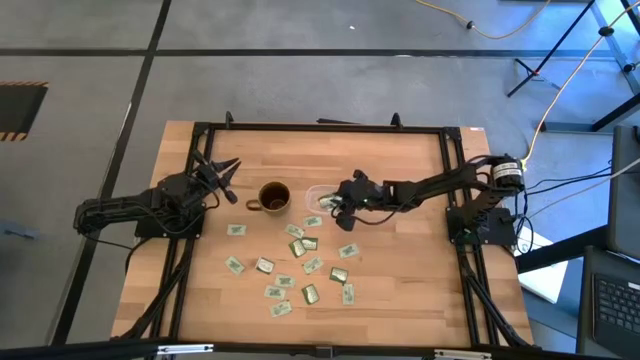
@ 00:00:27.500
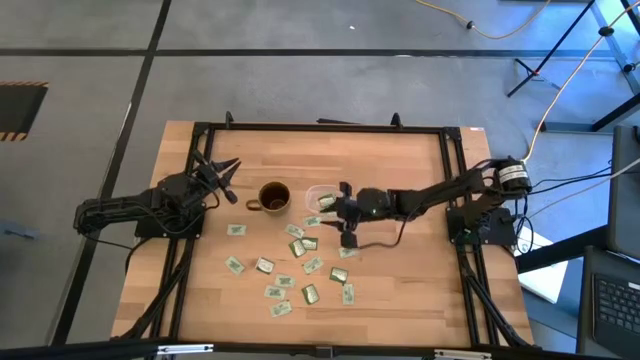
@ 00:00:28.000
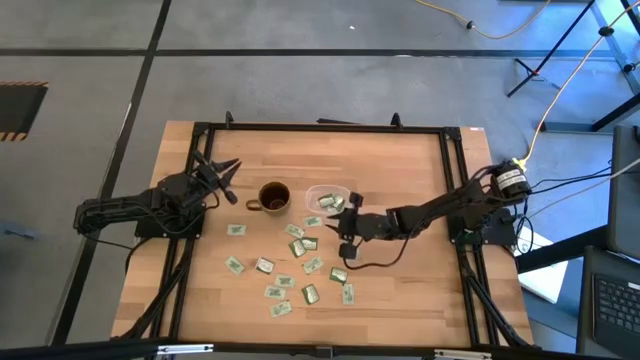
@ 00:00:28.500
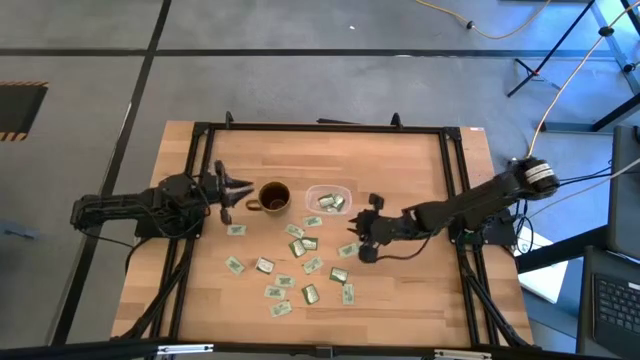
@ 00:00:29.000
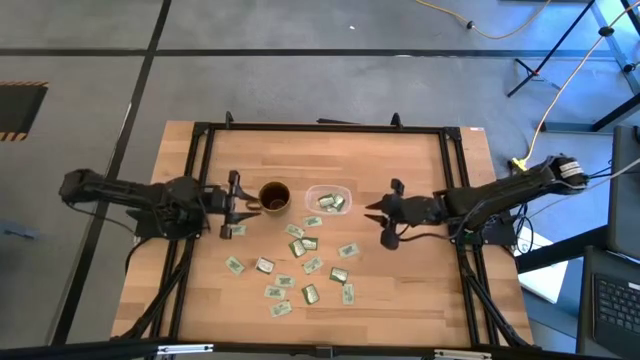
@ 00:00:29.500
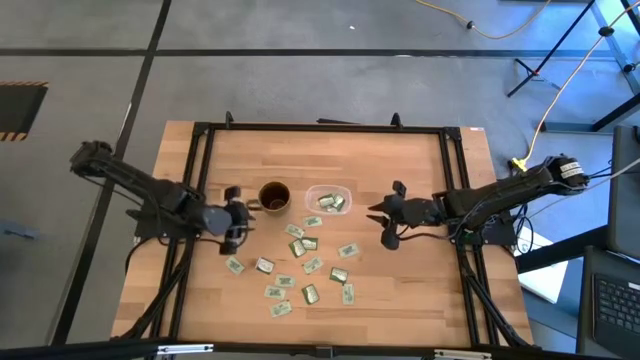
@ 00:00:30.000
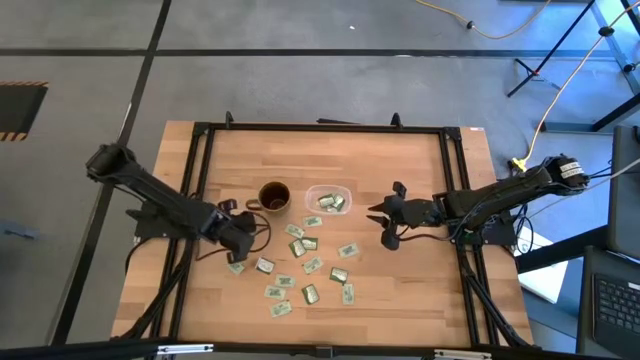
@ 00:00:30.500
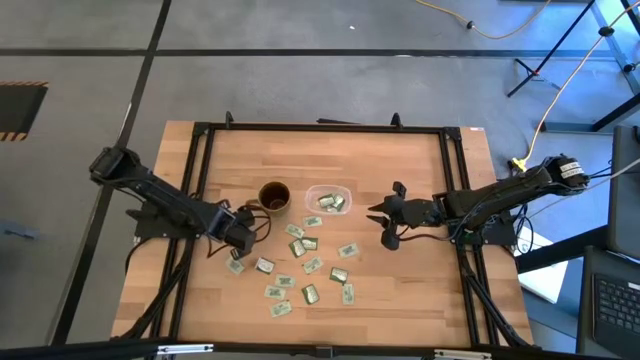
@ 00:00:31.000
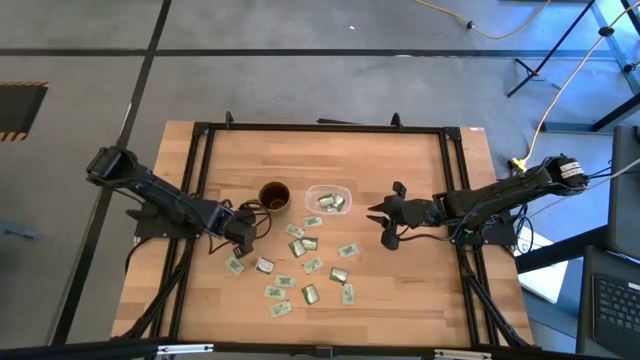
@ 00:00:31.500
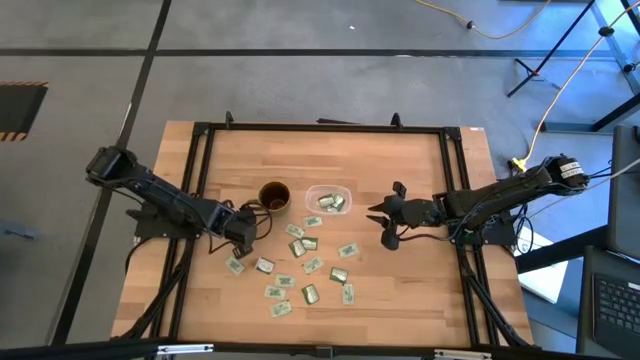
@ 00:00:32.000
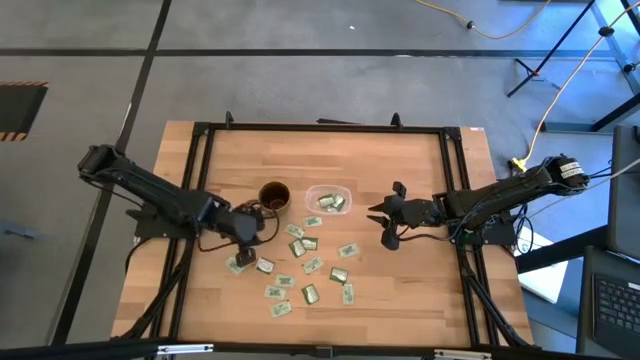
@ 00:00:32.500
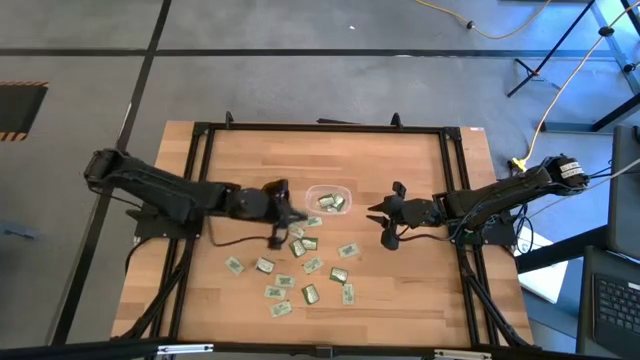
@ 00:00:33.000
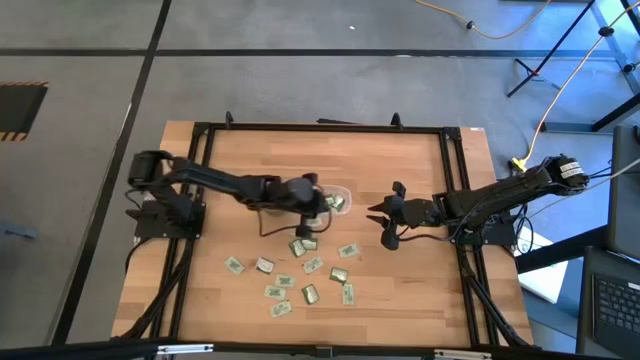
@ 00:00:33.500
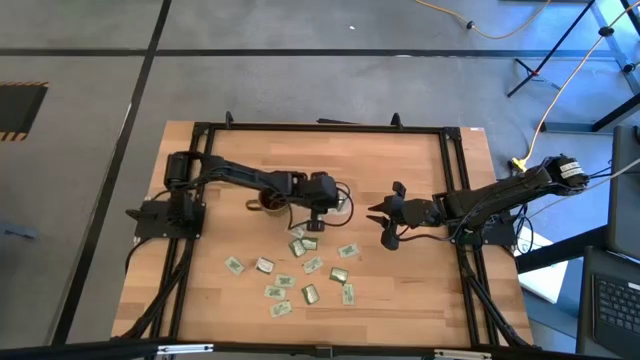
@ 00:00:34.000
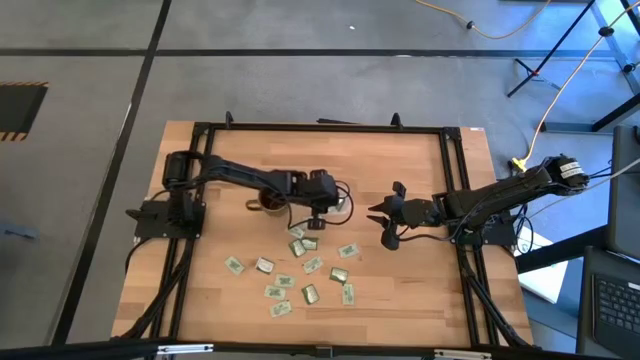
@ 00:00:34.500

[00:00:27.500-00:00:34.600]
Task: Pick and place items into bin
Put the light green stevia pack into the transparent bin

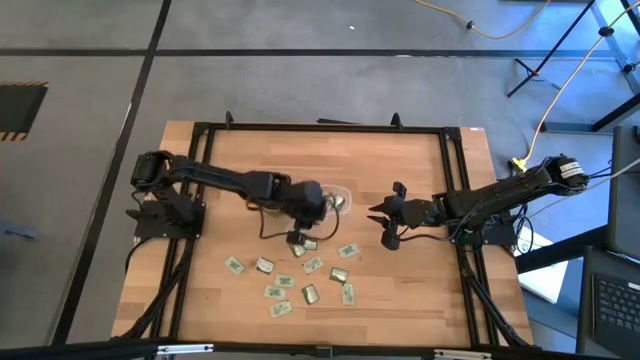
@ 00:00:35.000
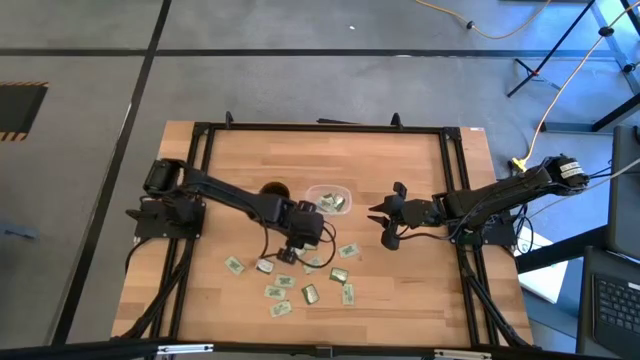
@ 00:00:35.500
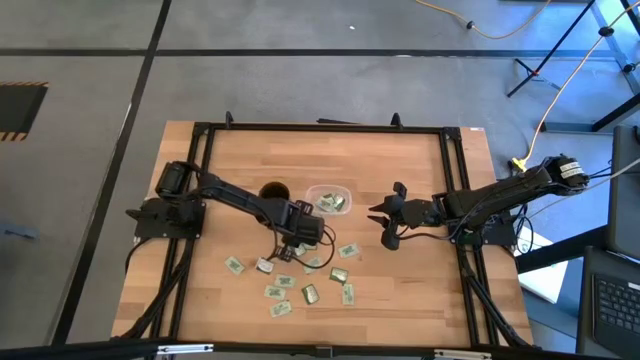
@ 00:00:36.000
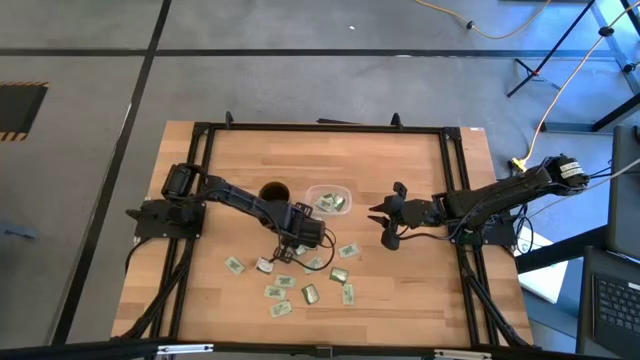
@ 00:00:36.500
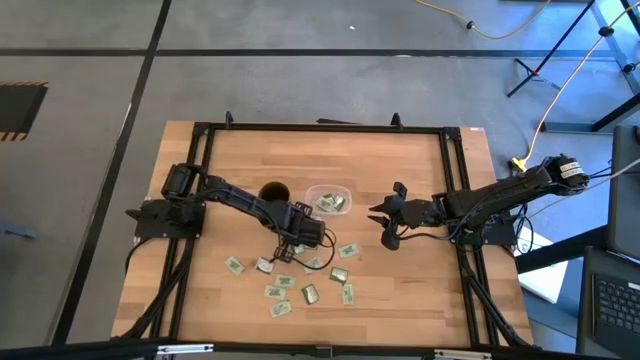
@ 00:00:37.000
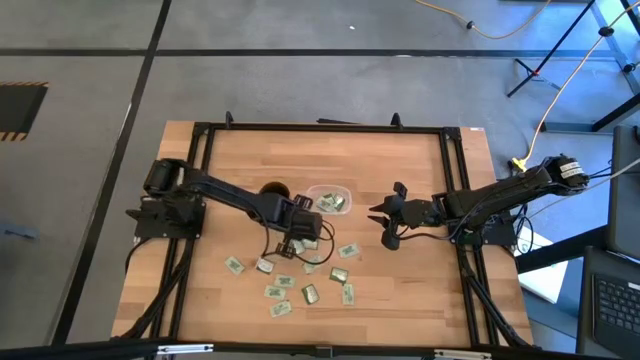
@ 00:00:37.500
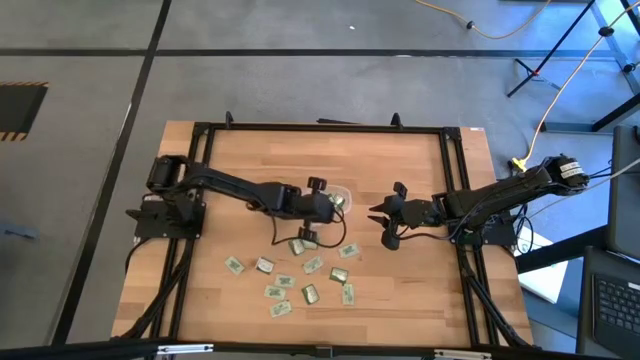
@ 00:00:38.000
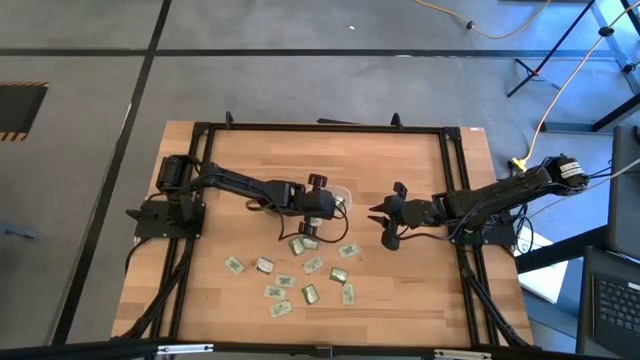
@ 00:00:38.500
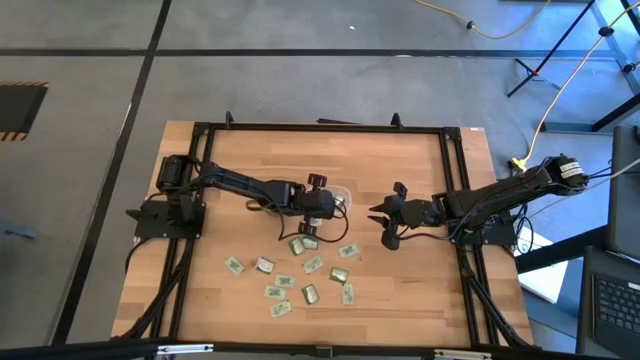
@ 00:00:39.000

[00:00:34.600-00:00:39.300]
Put the light green stevia pack into the transparent bin

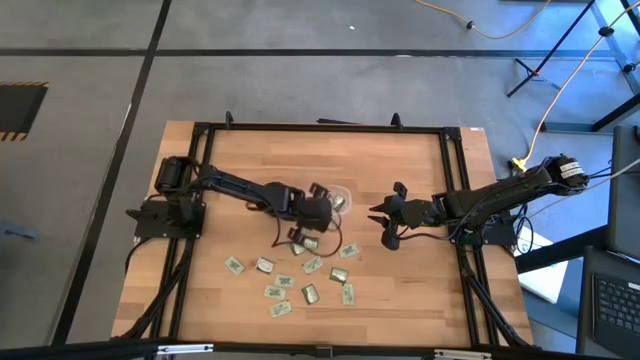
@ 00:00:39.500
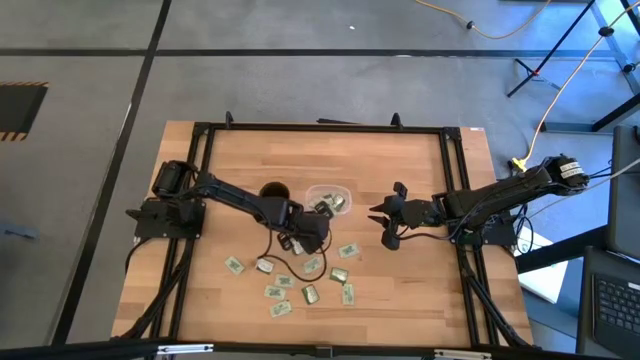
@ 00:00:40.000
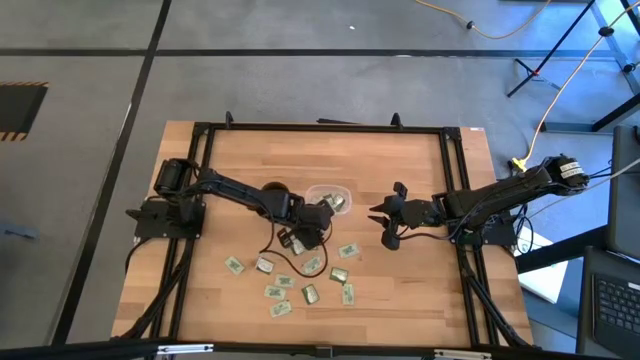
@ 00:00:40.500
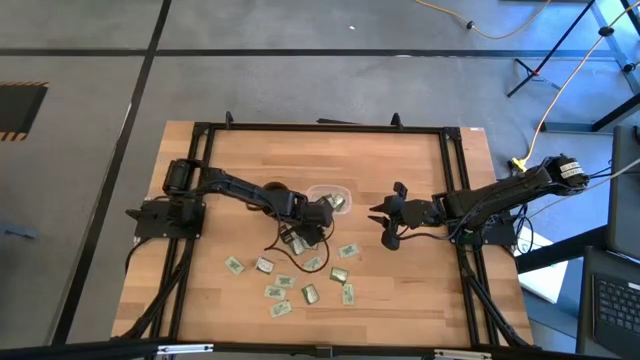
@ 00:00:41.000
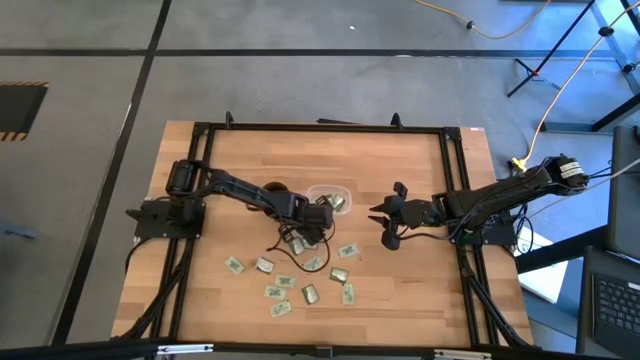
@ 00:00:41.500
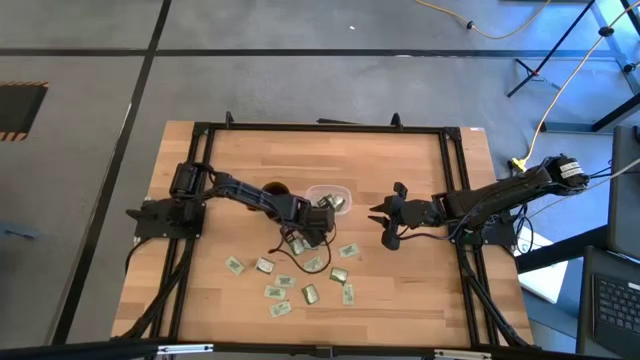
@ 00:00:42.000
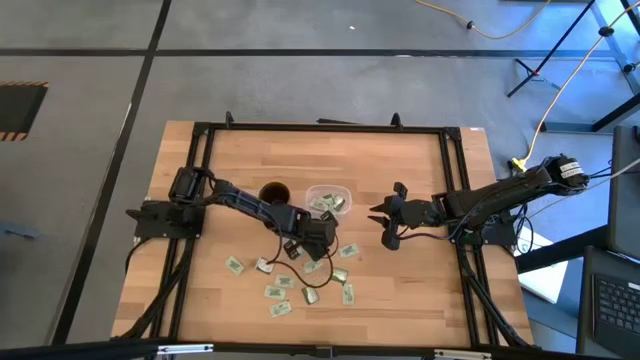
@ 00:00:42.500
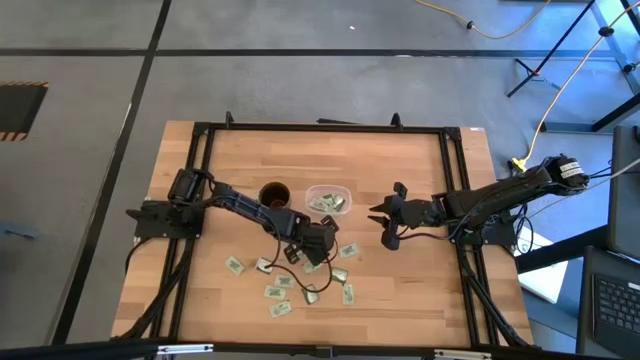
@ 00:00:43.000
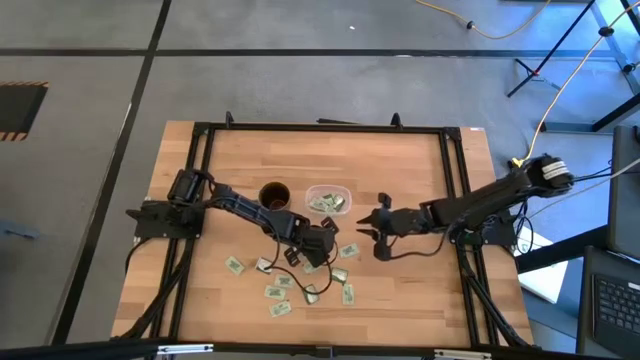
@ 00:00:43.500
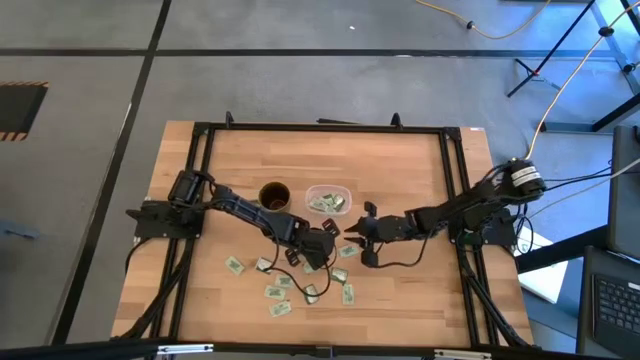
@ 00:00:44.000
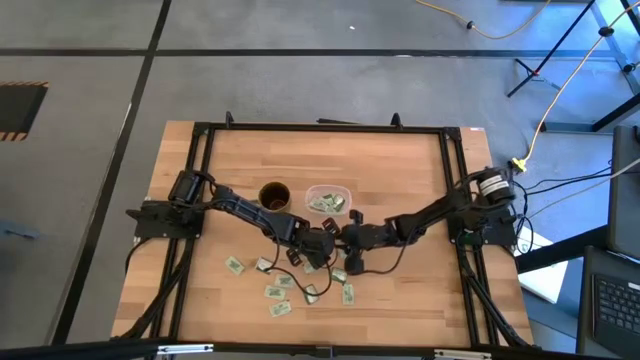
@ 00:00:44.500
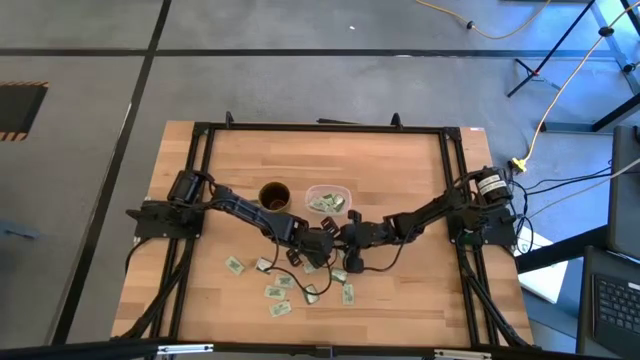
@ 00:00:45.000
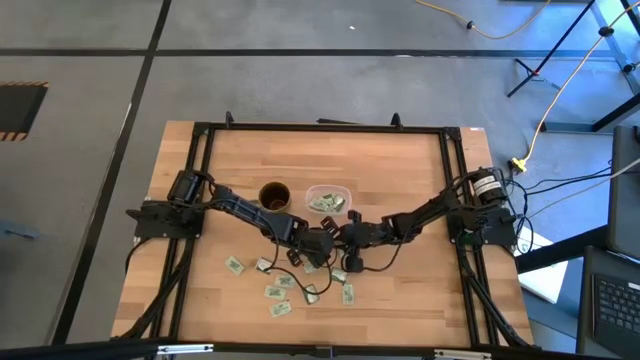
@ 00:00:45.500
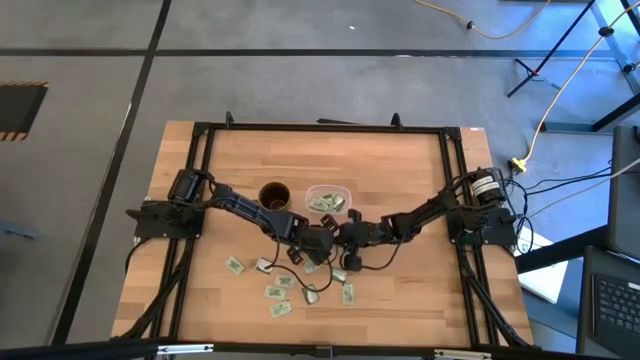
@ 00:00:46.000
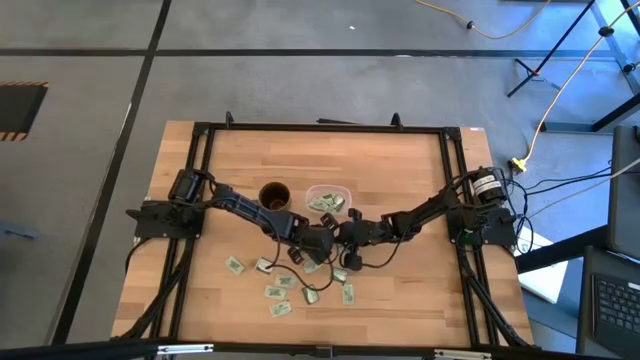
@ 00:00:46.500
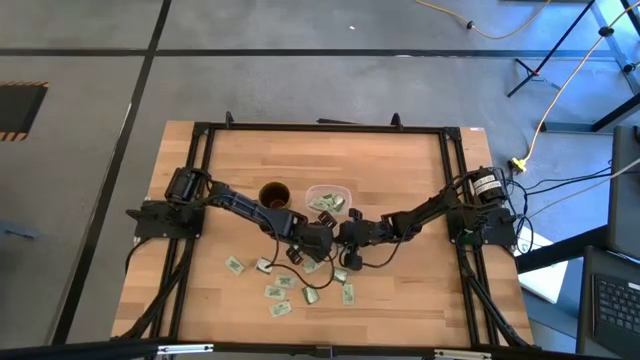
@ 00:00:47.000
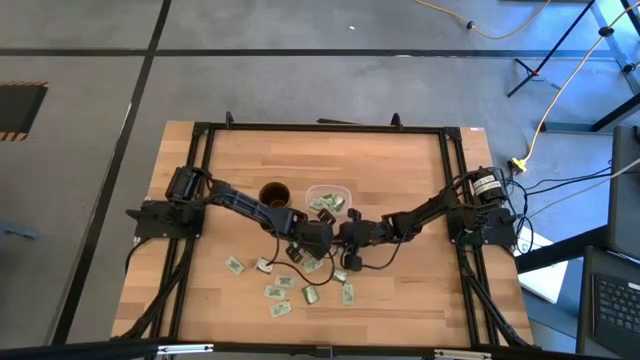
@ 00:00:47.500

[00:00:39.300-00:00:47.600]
Put the light green stevia pack into the transparent bin

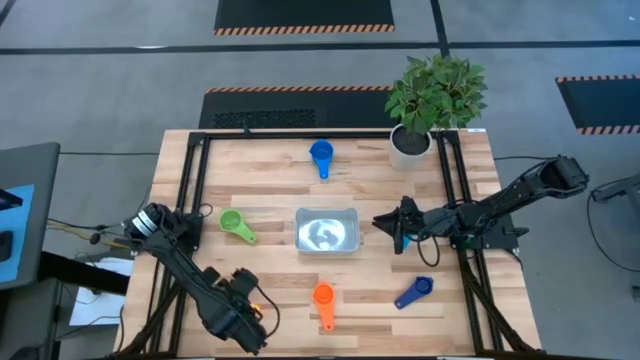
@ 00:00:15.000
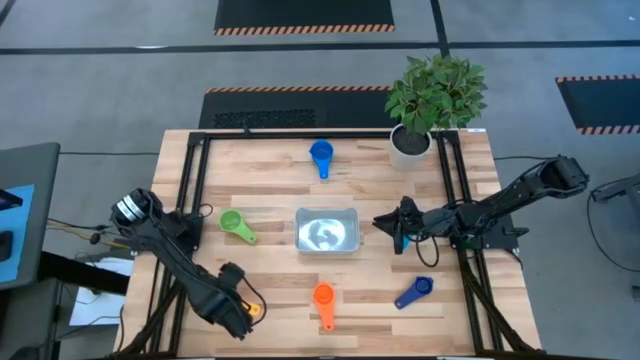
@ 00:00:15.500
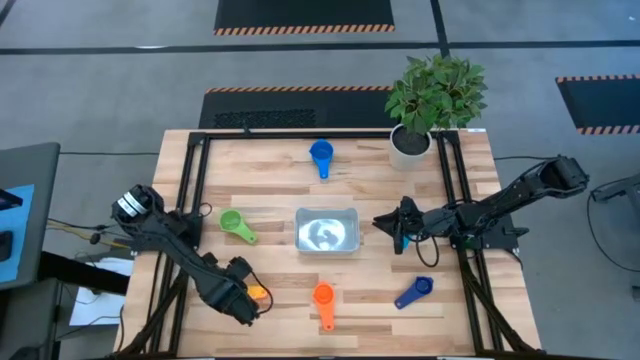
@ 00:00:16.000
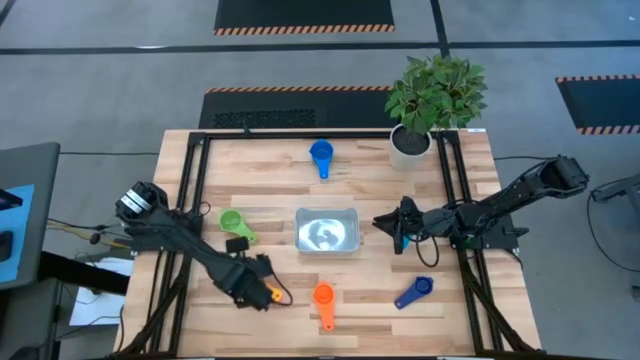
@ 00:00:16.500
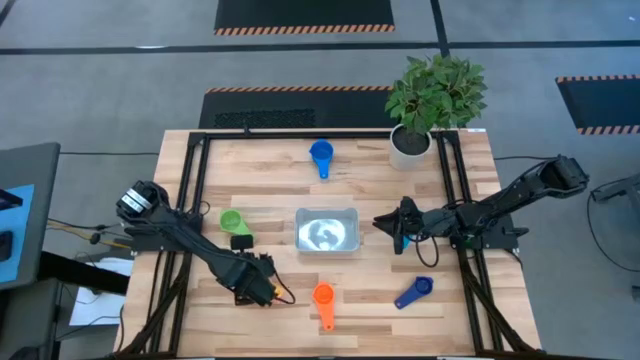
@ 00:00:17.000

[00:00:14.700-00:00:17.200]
Task: Nest measuring cups in basket
Adjust the stacked measuring cups
